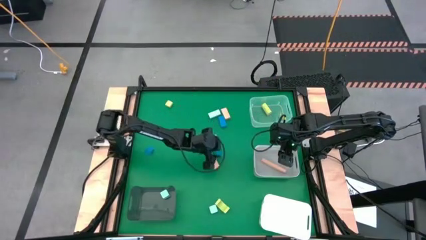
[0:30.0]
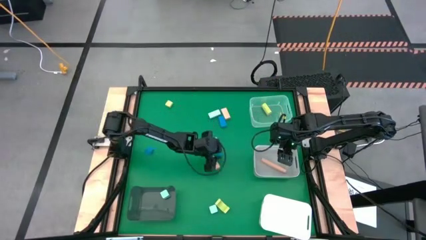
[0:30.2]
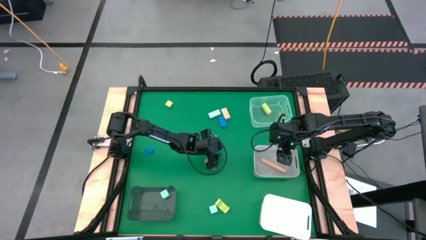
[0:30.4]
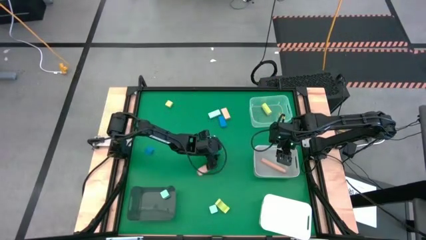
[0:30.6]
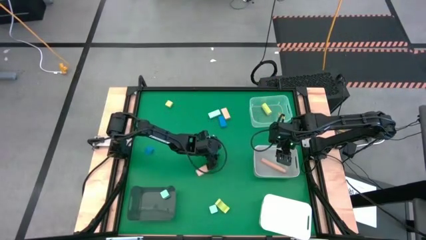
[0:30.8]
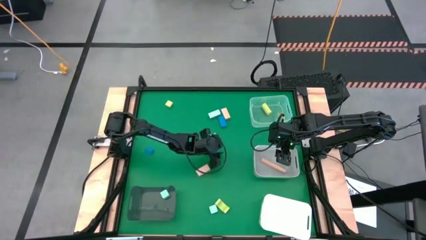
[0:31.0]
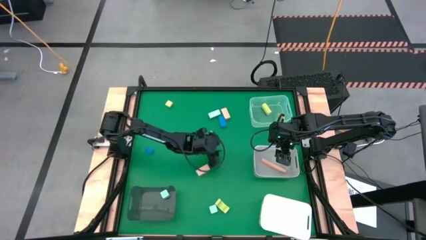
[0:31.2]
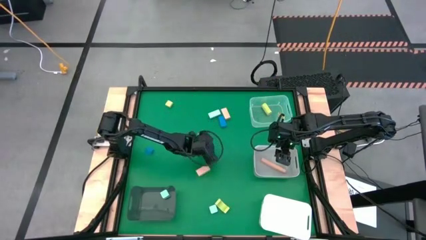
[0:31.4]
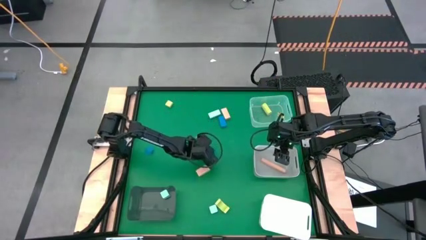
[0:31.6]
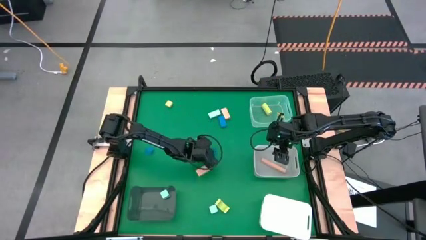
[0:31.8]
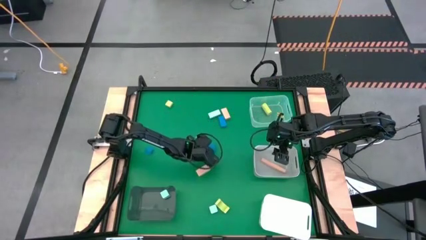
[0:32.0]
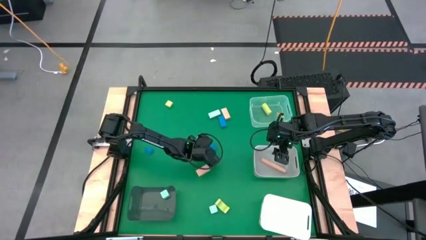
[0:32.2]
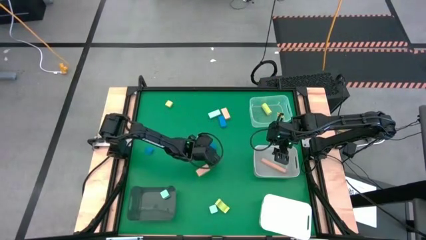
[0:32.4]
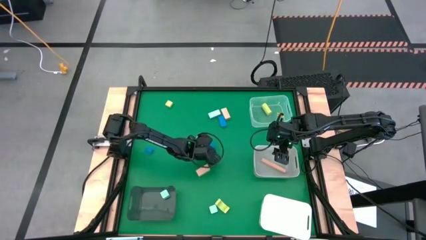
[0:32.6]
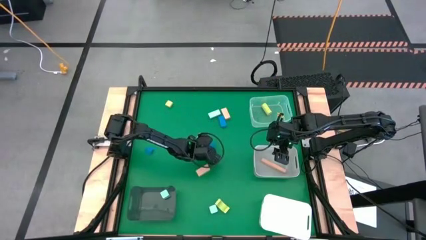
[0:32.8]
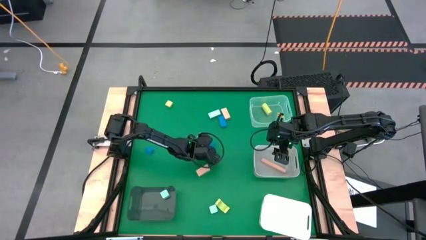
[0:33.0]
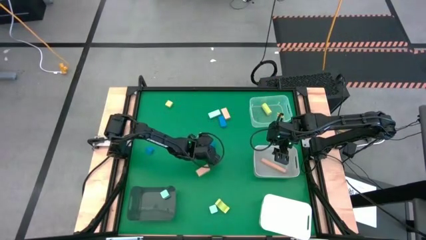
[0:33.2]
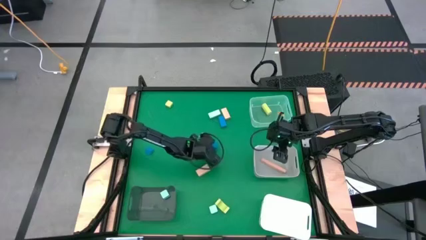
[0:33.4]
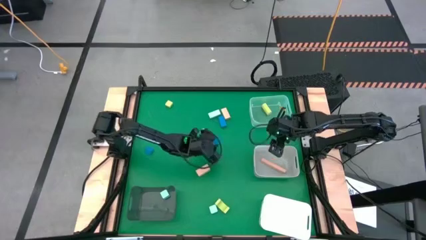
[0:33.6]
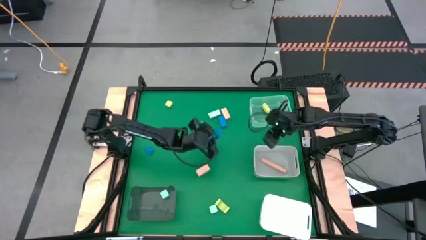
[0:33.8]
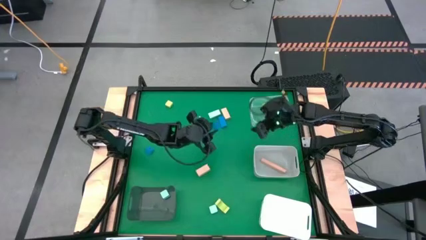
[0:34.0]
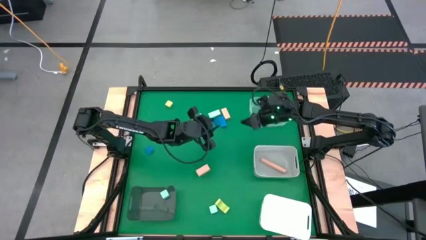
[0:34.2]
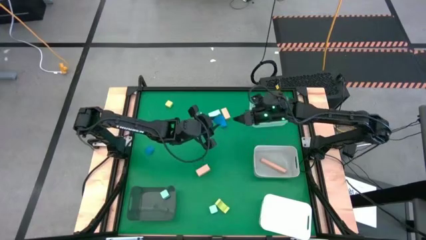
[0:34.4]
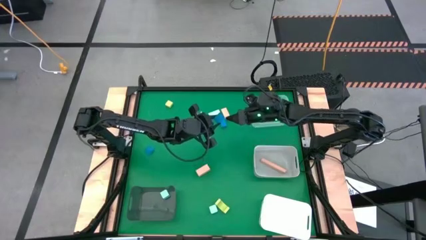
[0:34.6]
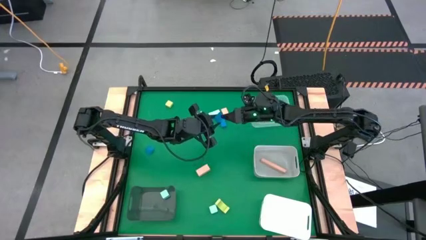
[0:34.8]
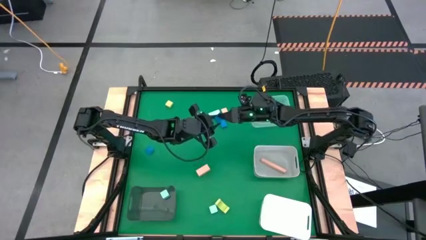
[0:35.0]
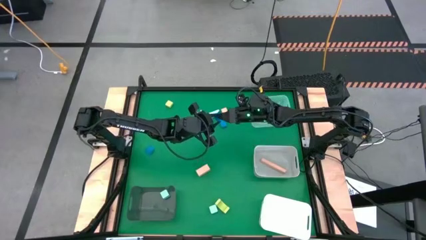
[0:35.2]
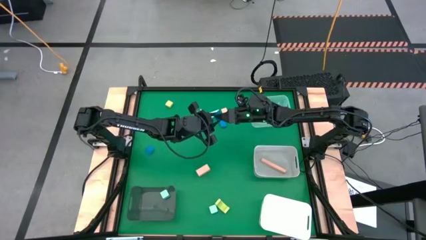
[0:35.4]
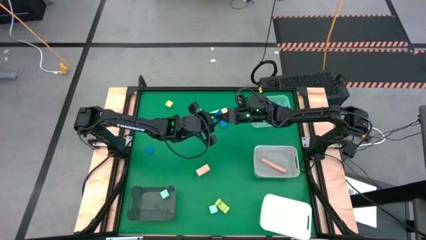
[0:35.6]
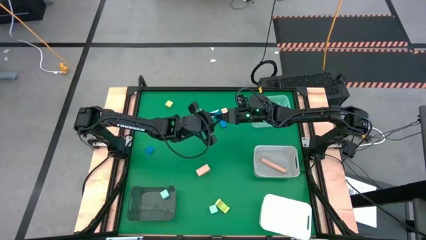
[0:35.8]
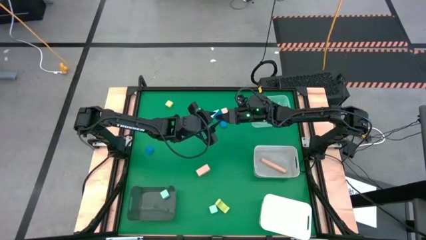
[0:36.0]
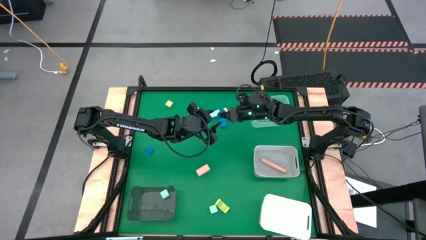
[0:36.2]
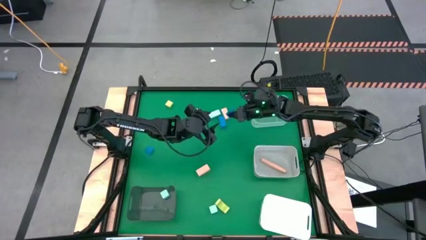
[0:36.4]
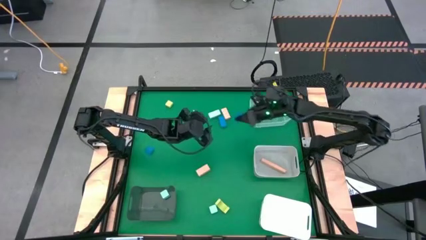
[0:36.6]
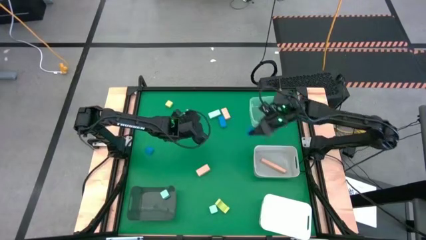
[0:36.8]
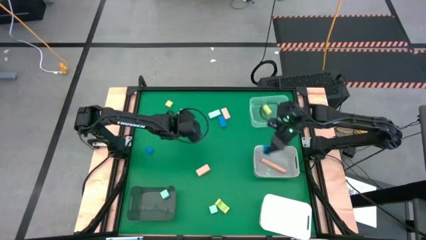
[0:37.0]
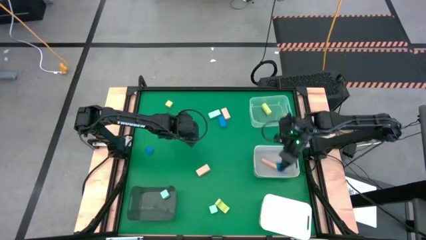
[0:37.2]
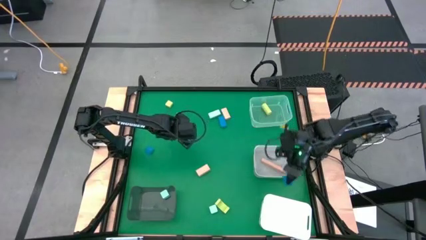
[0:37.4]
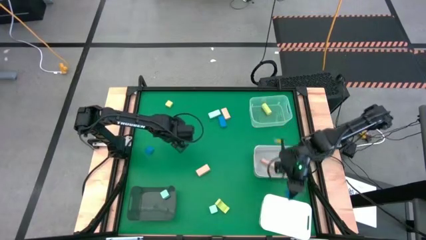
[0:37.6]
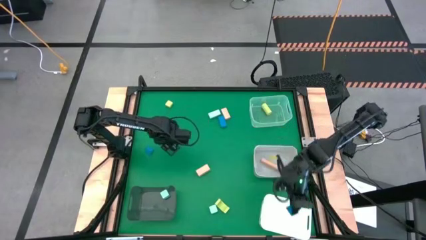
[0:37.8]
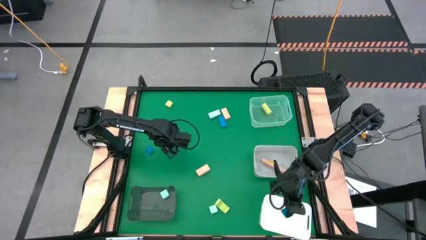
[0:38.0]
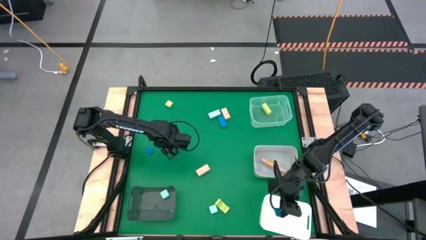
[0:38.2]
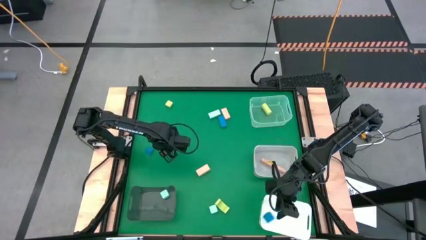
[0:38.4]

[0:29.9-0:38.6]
Task: Sort & place blocks by color
Put the bottom right blue block into the white bin

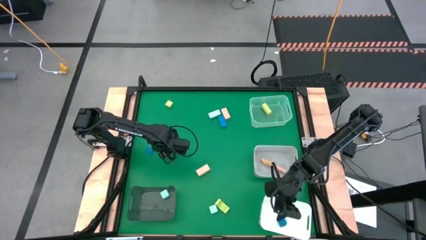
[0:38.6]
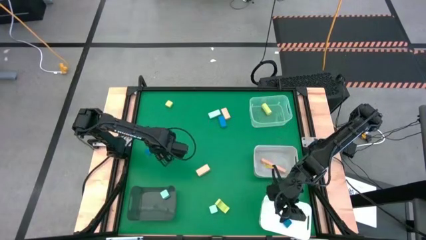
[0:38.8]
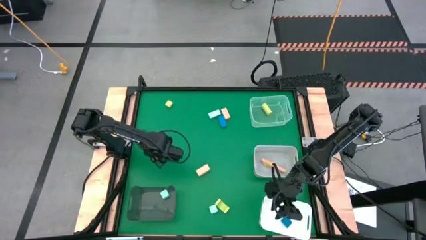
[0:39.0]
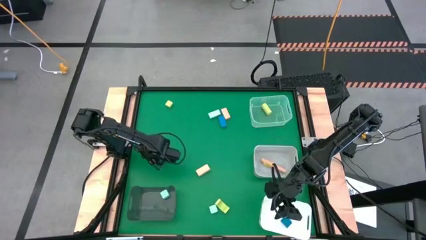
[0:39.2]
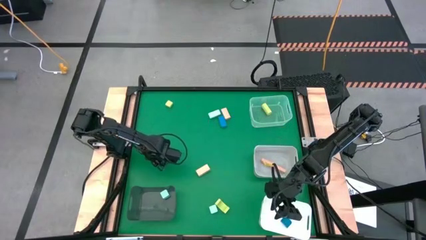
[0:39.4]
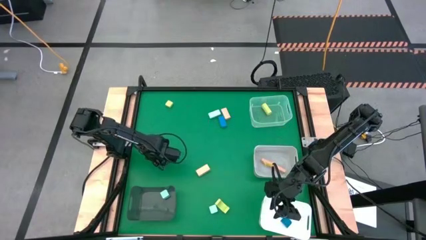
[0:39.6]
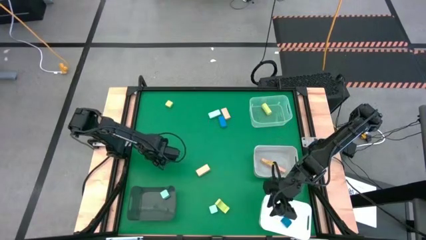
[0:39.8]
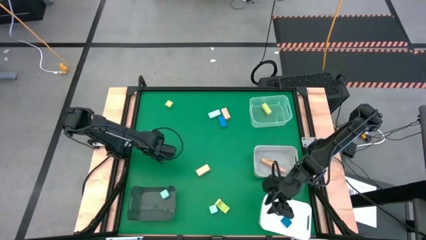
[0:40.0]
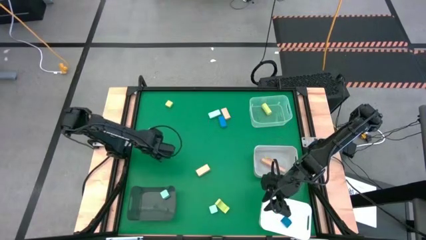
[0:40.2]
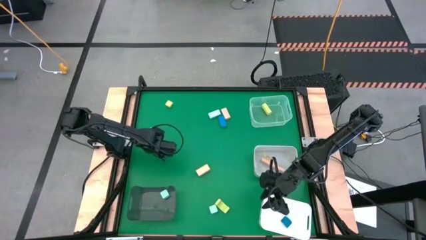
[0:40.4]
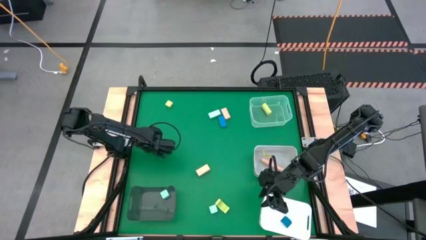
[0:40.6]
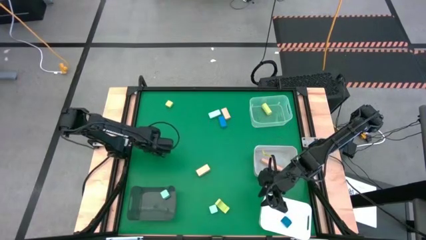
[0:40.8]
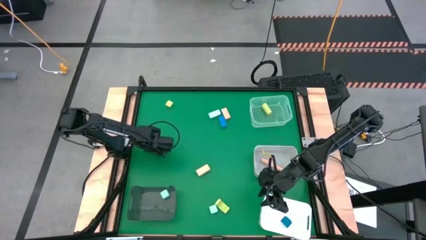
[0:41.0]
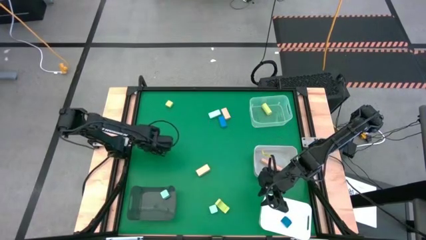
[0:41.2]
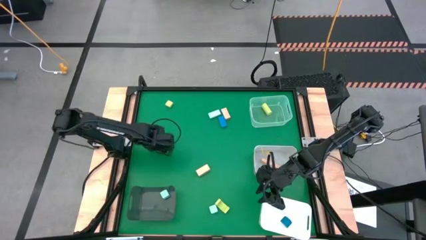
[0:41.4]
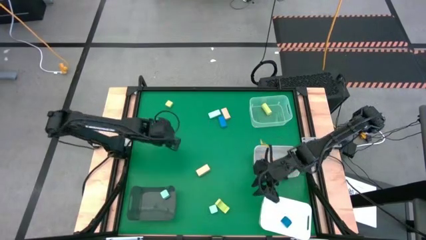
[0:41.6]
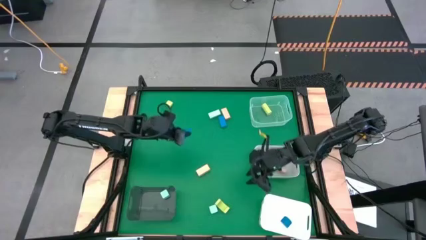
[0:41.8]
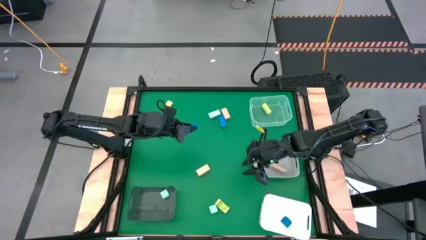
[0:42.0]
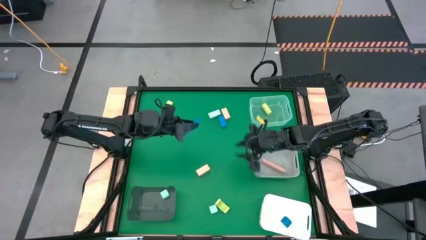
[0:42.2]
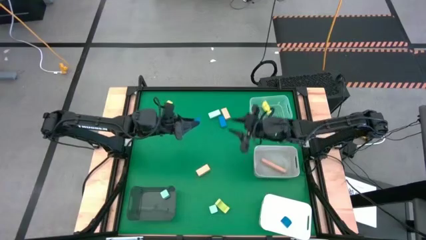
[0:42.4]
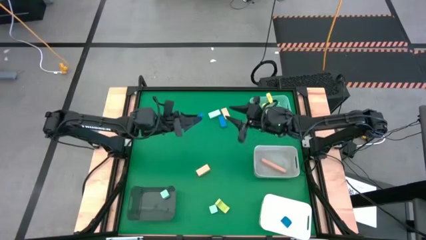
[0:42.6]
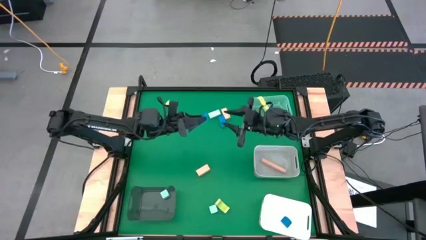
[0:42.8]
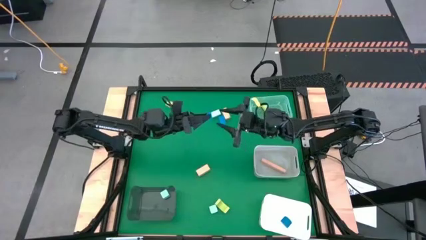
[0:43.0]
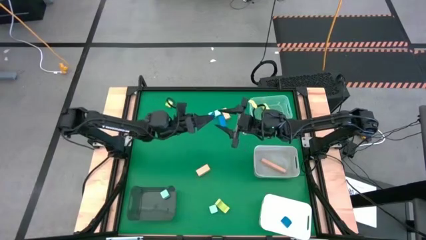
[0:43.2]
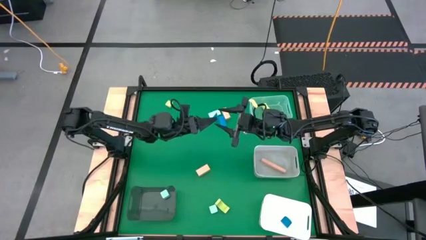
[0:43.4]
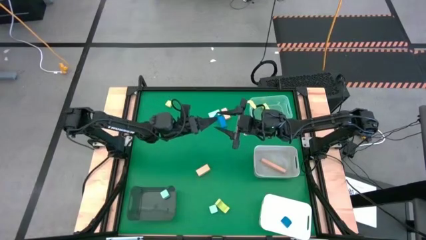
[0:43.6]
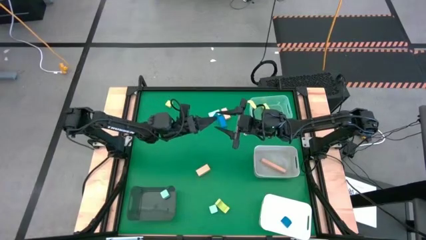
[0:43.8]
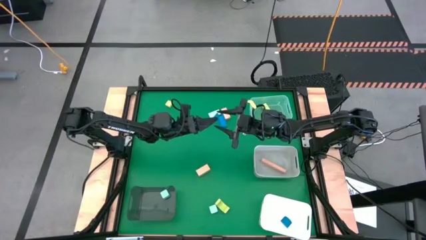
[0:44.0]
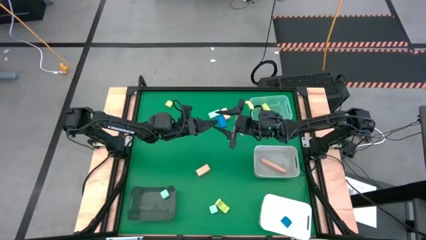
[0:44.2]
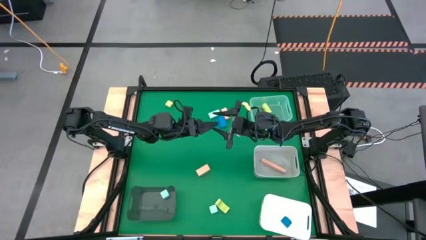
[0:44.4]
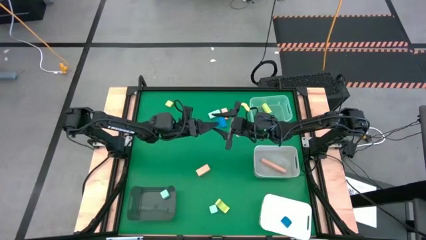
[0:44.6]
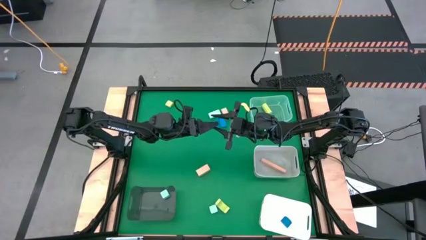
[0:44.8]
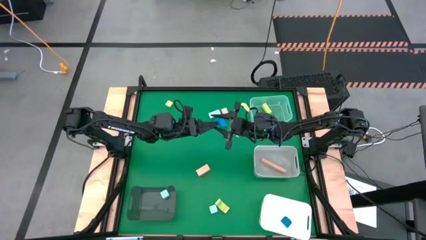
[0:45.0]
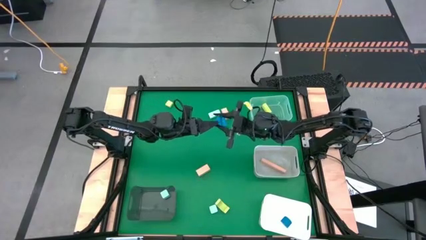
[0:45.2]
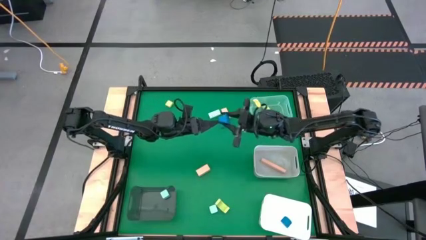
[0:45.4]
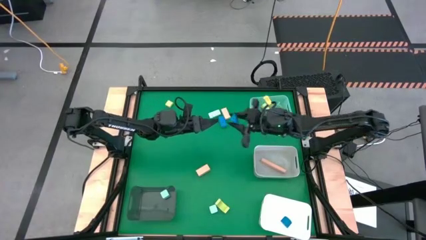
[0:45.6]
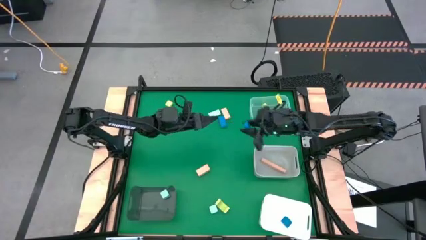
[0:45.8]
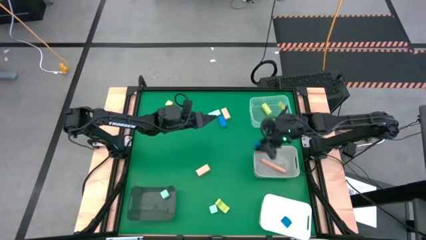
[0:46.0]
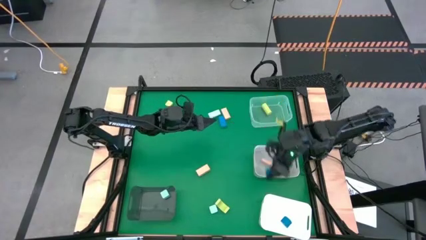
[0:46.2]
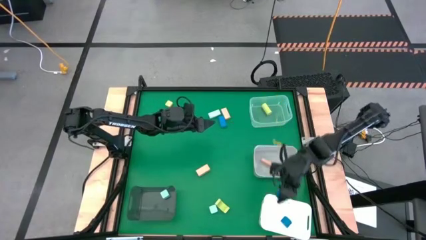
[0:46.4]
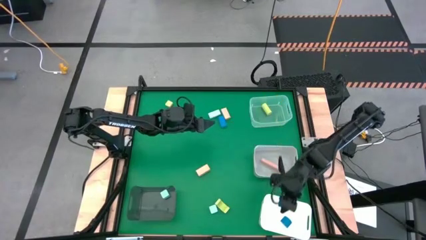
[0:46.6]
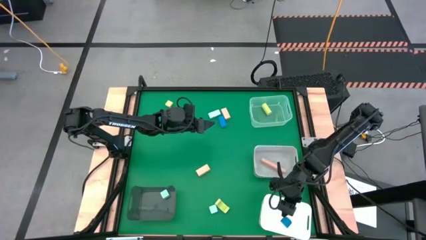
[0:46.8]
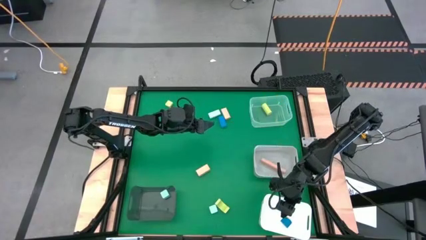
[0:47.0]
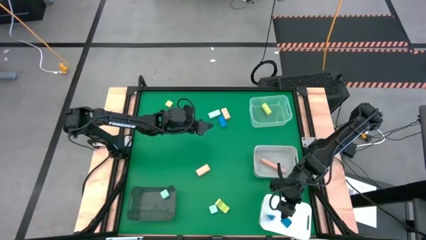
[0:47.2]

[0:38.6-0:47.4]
Put the left blue block into the white bin
